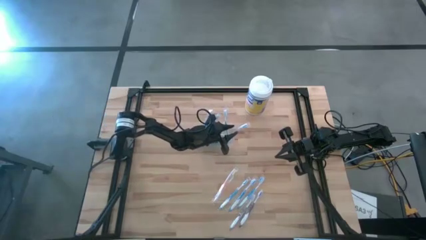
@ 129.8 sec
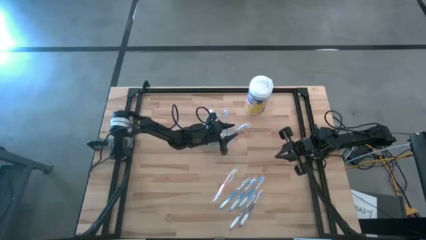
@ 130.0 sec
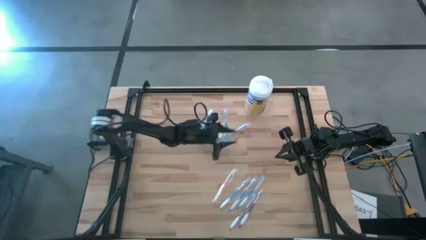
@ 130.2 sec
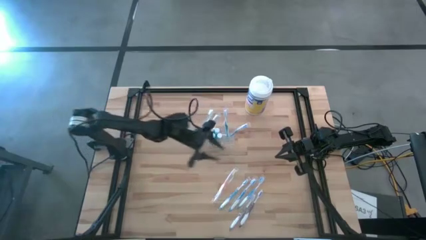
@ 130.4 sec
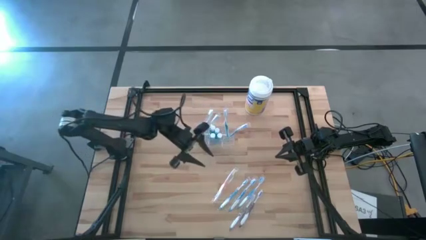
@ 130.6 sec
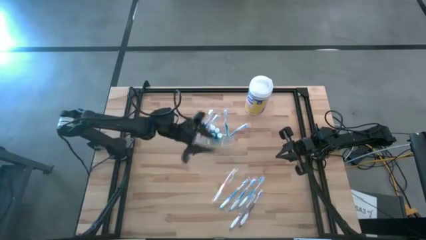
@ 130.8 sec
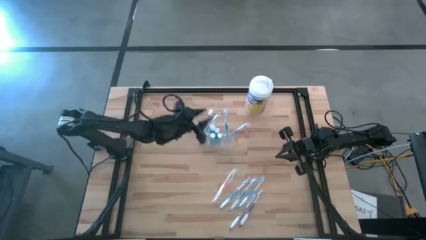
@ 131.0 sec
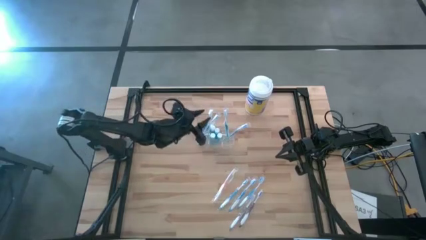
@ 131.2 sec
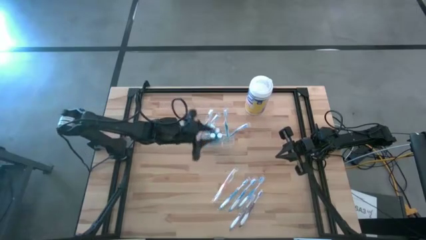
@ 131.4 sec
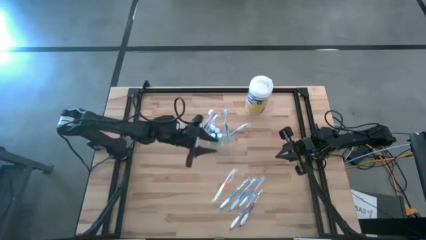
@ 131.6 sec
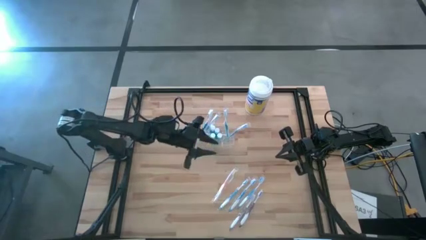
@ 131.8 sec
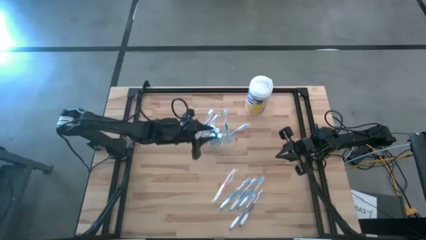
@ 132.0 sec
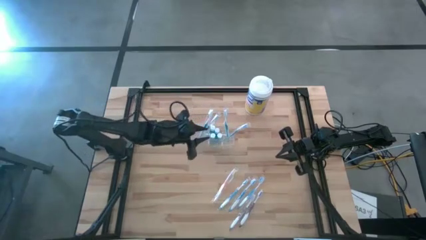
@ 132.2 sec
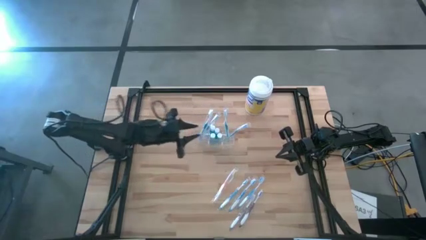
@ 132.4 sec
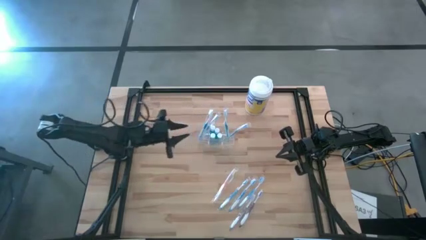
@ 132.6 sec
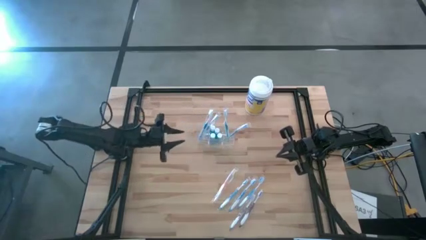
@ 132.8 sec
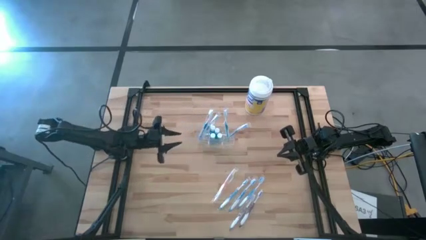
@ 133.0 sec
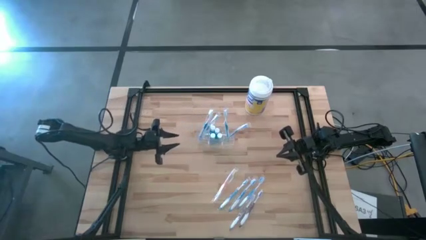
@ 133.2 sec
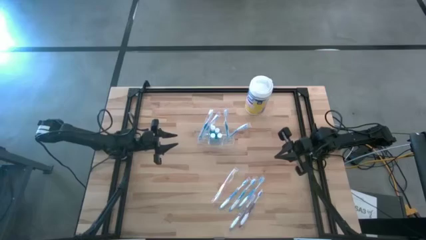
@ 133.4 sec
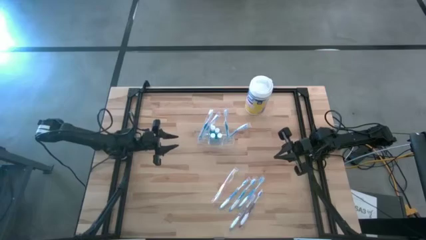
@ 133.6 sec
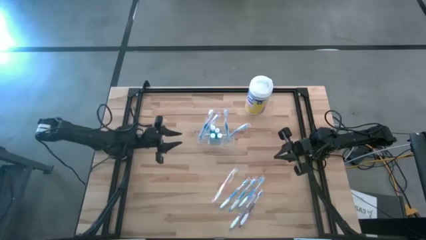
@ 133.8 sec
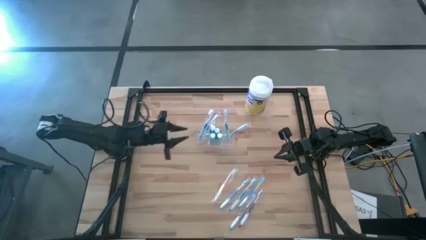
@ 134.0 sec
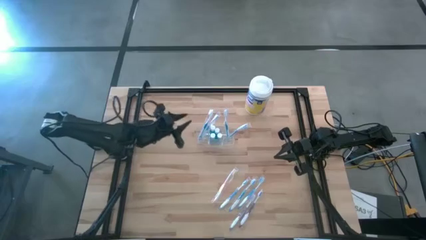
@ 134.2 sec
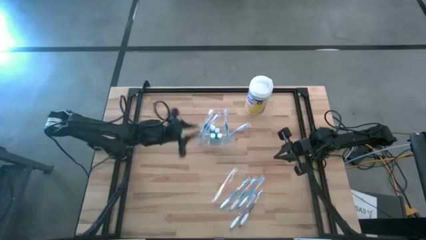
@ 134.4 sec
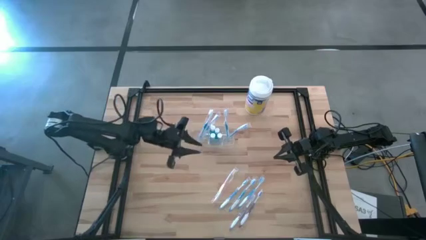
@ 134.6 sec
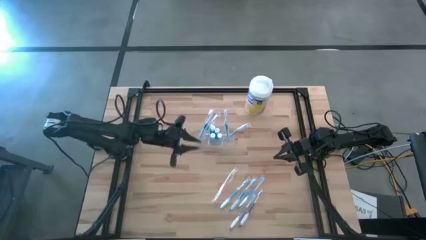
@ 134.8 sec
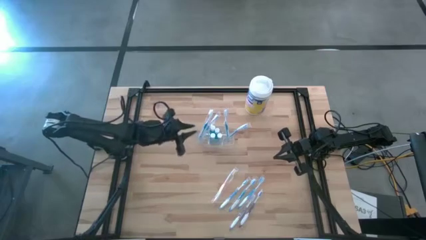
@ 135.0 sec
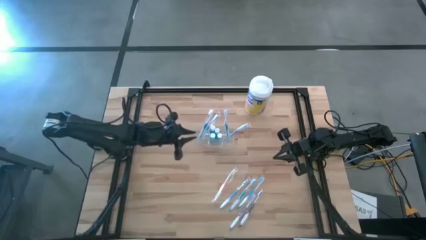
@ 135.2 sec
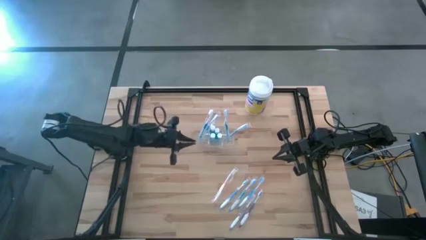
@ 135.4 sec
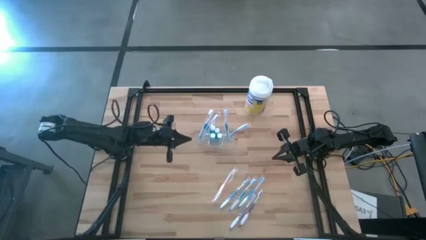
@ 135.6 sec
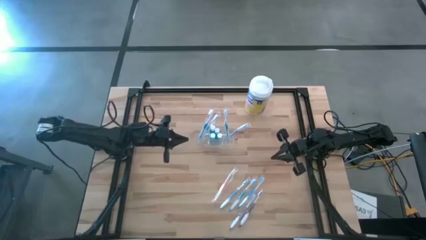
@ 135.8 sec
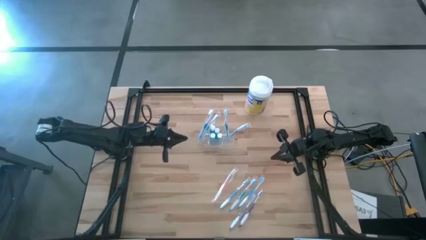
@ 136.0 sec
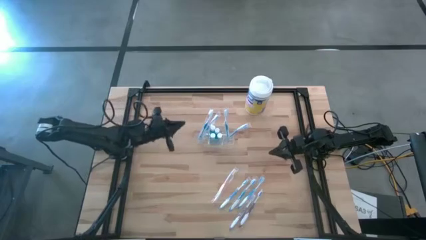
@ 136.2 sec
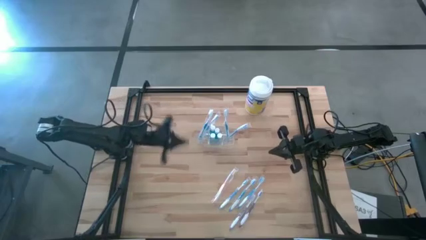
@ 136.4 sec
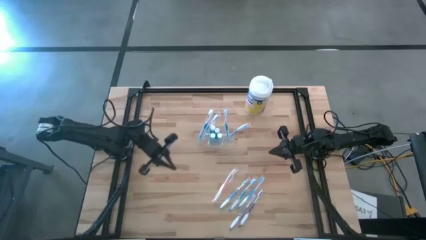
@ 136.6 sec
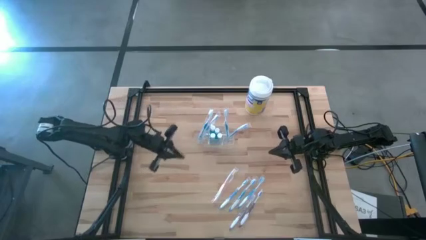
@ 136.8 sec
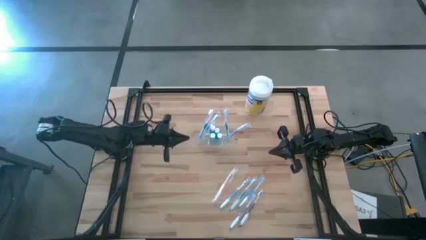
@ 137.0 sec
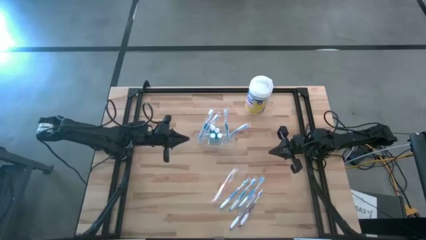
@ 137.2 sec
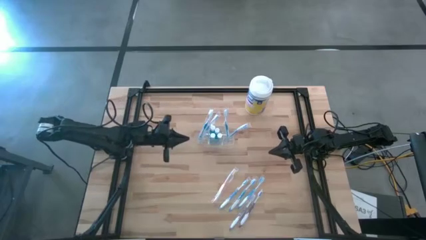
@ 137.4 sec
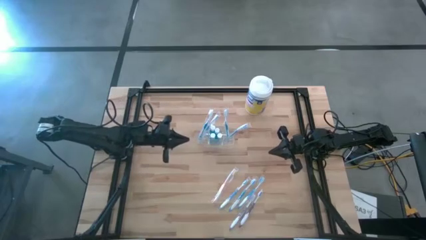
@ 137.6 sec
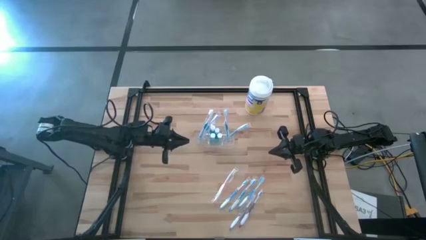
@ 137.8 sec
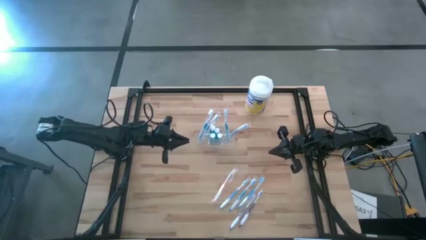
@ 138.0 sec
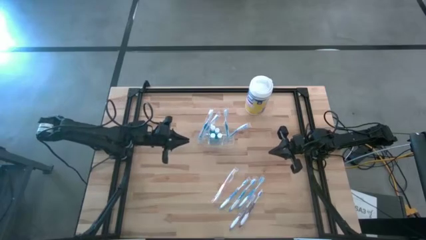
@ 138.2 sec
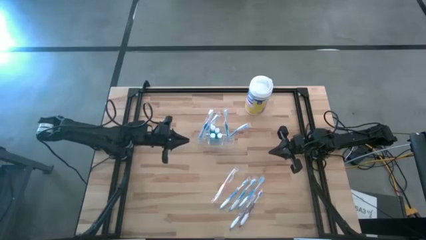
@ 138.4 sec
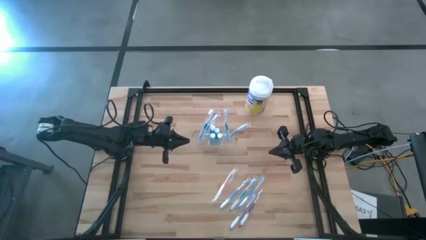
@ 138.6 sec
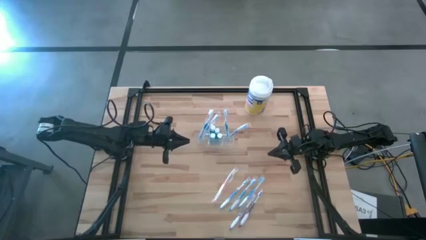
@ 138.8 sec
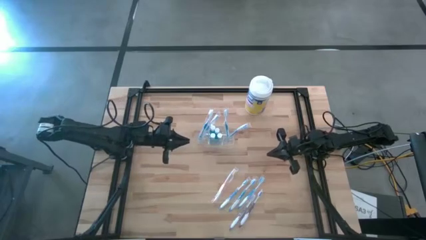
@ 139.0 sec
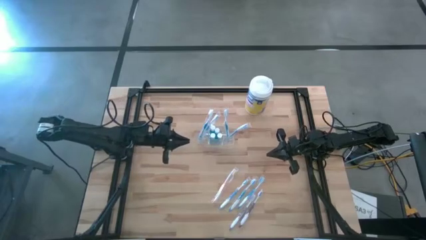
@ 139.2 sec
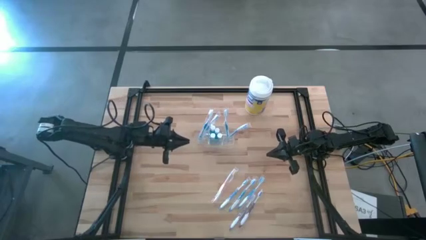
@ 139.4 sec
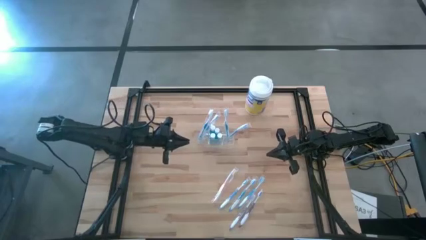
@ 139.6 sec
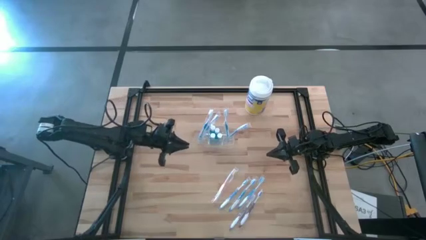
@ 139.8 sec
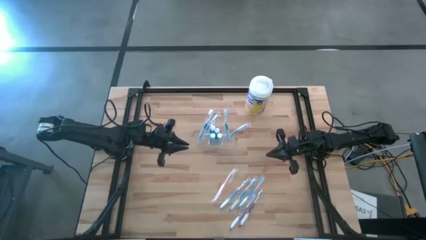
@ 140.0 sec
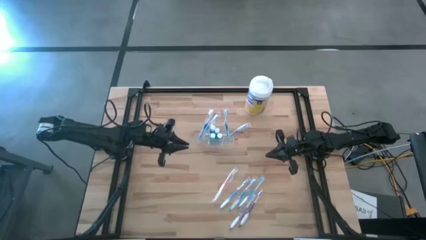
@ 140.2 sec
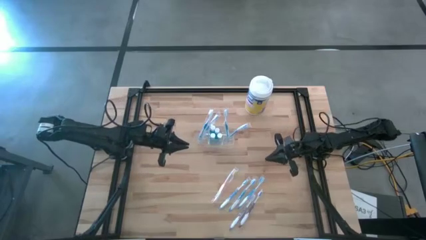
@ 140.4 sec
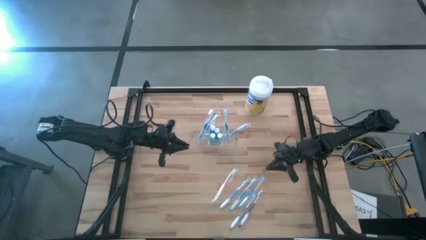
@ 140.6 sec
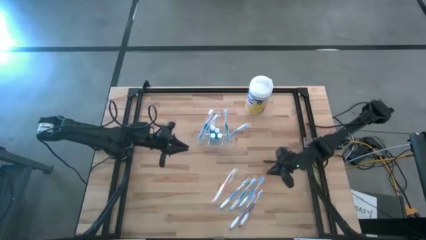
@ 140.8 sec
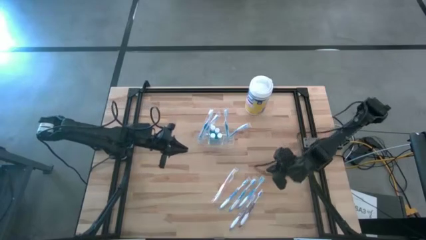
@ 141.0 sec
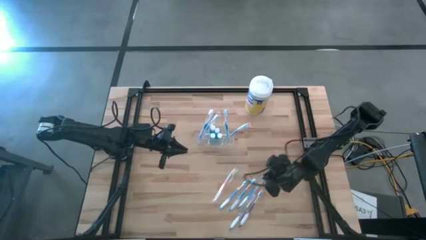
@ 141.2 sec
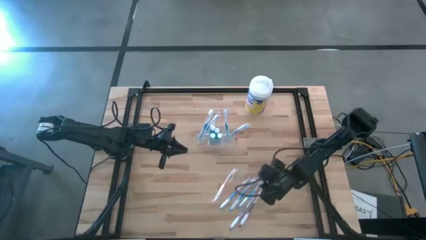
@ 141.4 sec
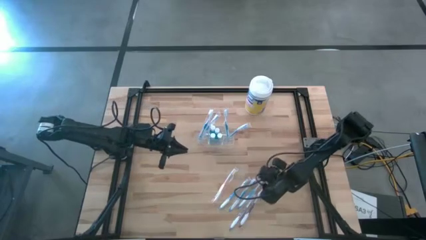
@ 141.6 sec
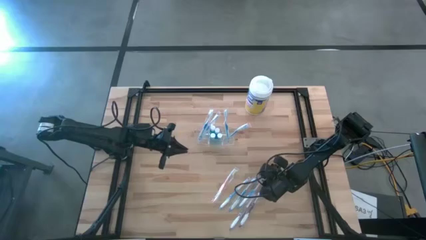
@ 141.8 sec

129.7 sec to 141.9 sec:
Task: Pick & Place toothbrushing station
Put the blue toothbrush into the transparent organizer
